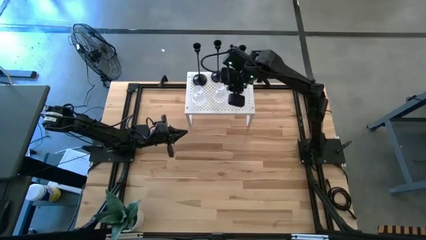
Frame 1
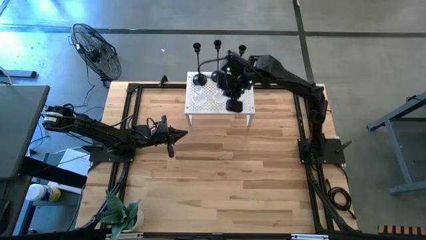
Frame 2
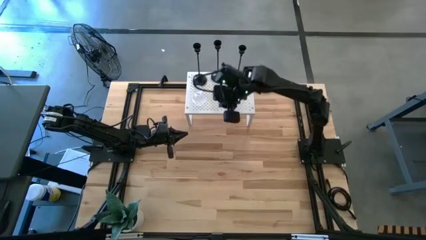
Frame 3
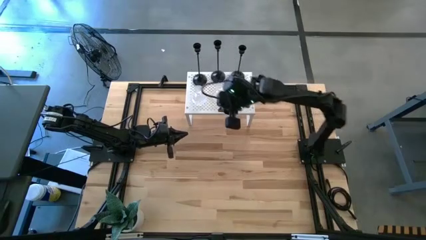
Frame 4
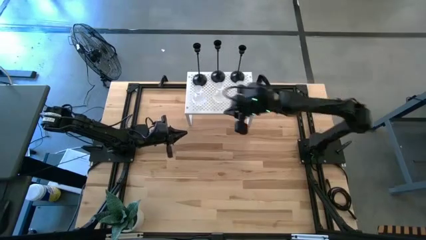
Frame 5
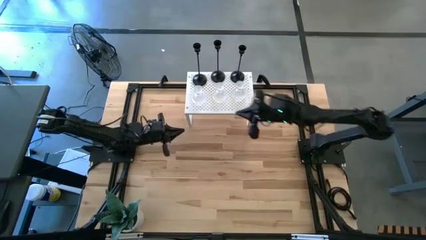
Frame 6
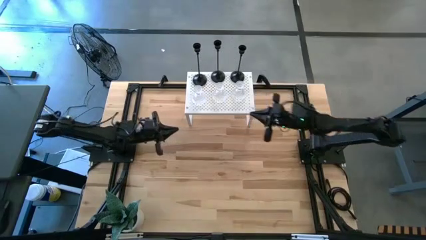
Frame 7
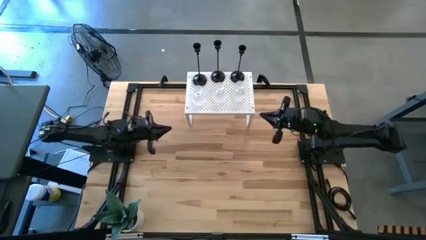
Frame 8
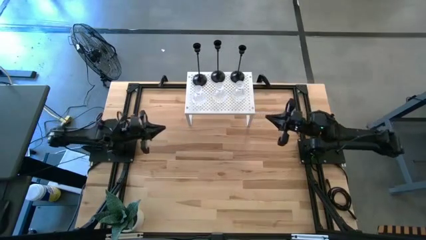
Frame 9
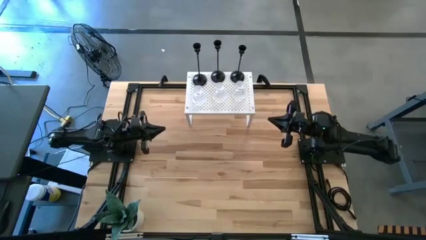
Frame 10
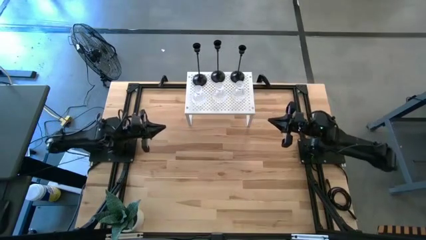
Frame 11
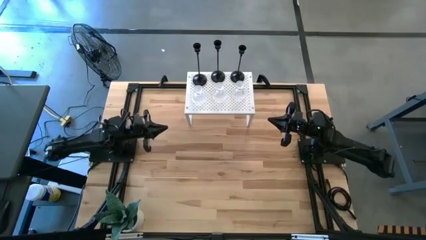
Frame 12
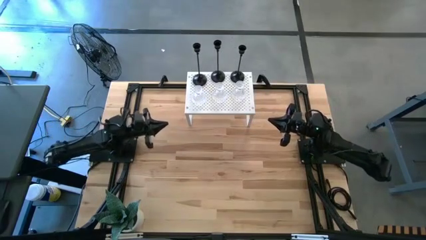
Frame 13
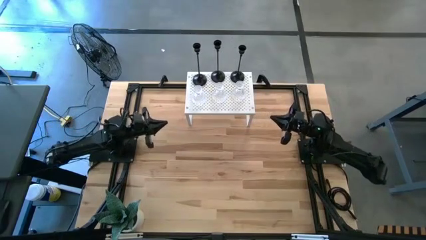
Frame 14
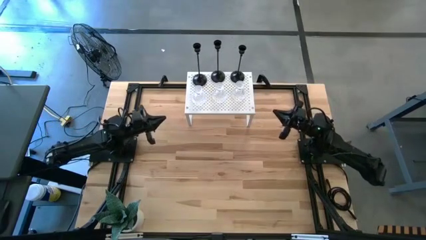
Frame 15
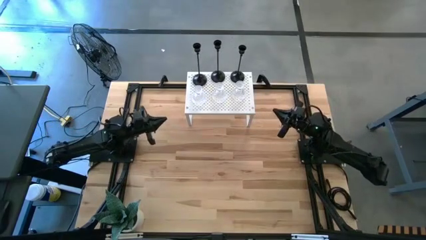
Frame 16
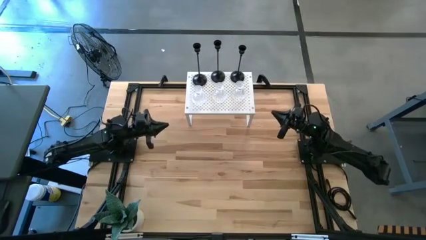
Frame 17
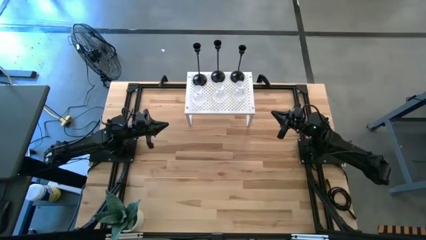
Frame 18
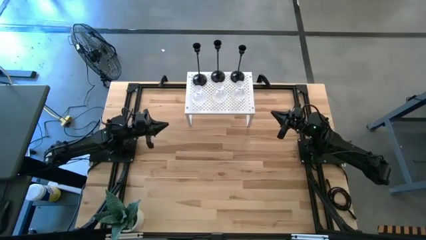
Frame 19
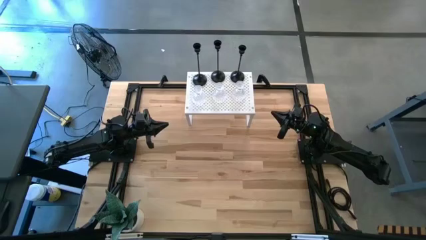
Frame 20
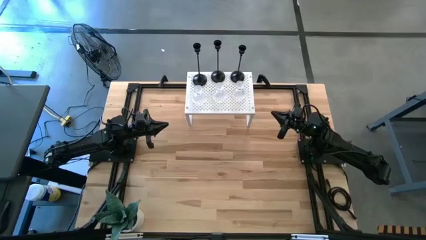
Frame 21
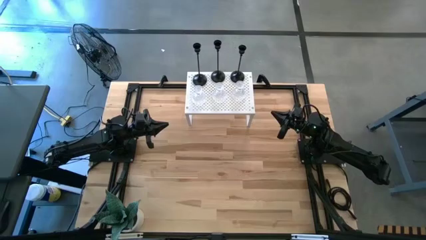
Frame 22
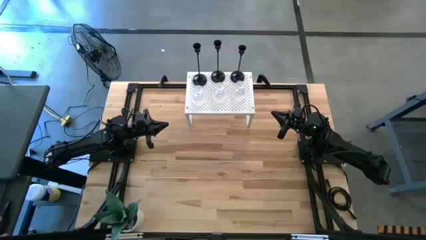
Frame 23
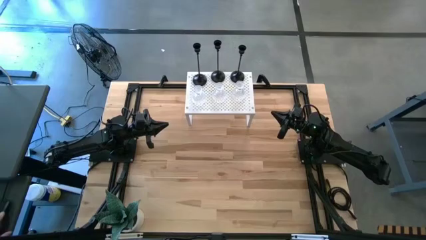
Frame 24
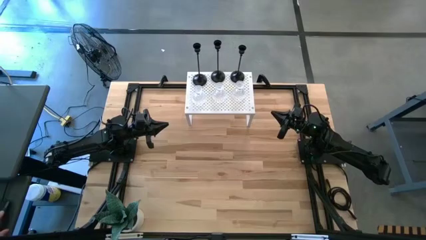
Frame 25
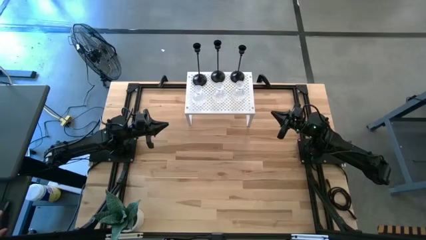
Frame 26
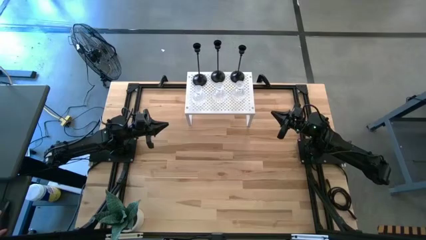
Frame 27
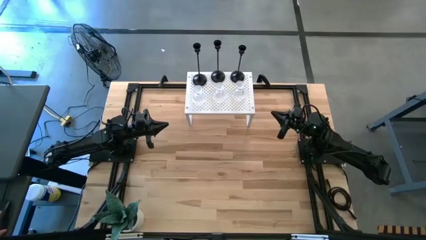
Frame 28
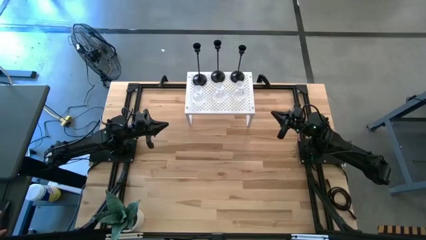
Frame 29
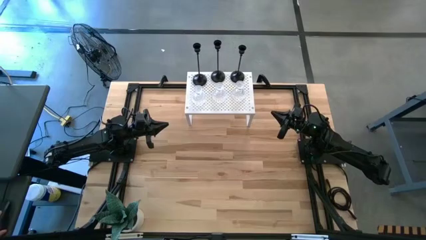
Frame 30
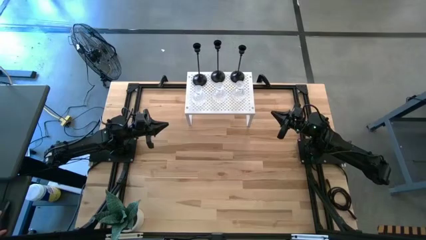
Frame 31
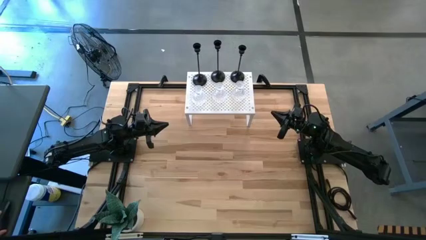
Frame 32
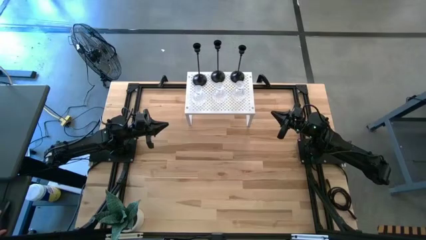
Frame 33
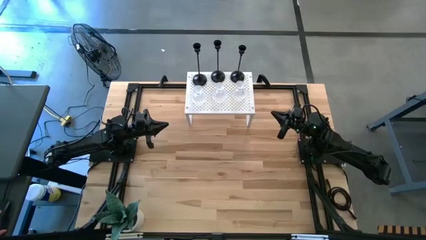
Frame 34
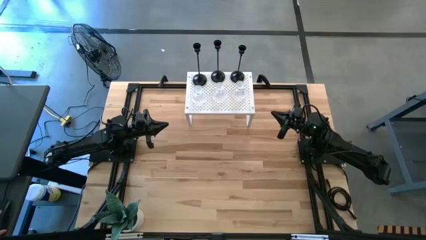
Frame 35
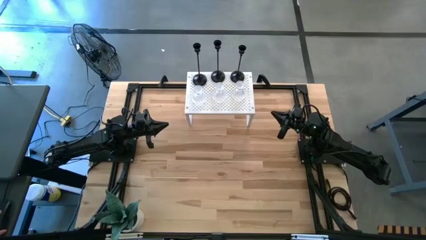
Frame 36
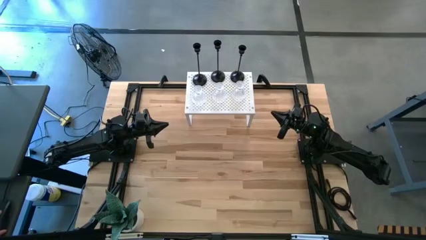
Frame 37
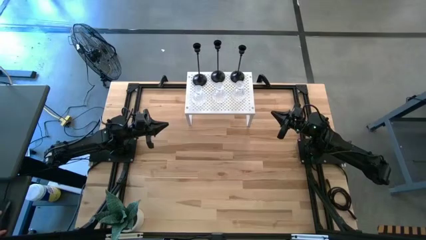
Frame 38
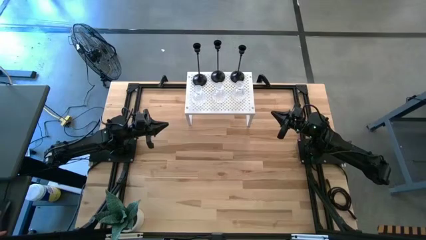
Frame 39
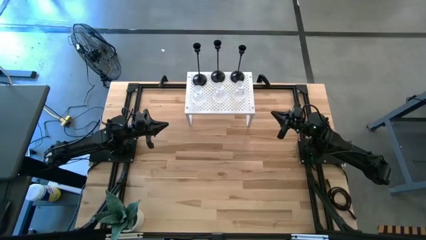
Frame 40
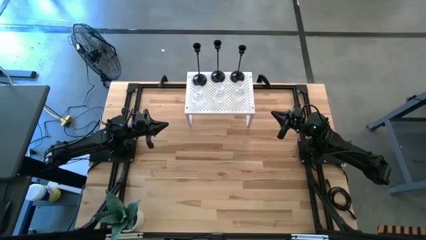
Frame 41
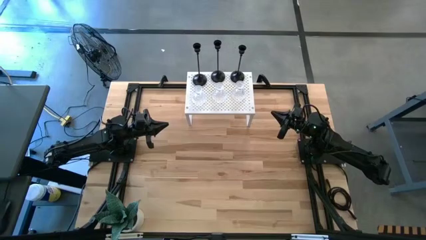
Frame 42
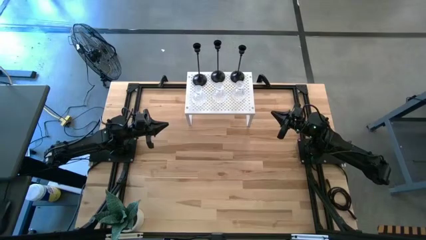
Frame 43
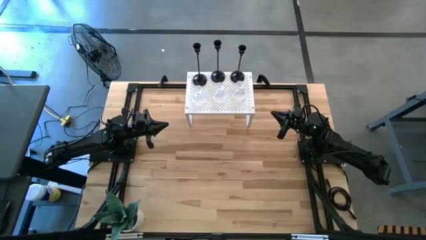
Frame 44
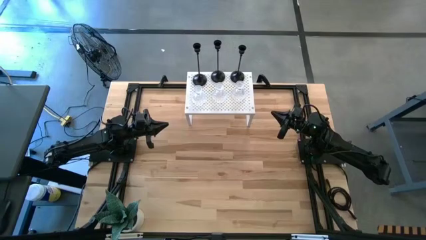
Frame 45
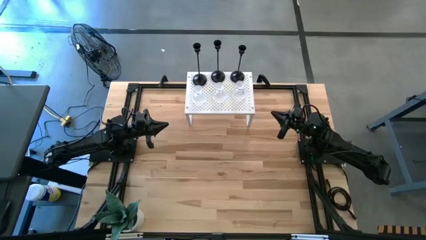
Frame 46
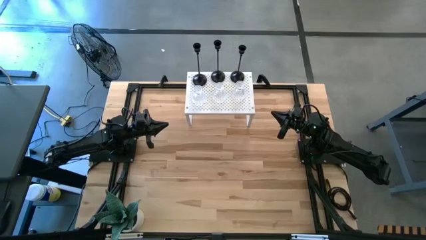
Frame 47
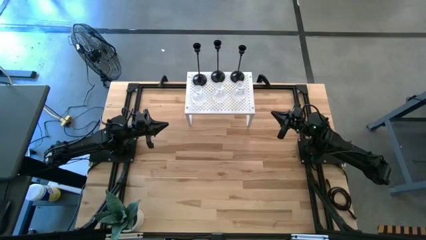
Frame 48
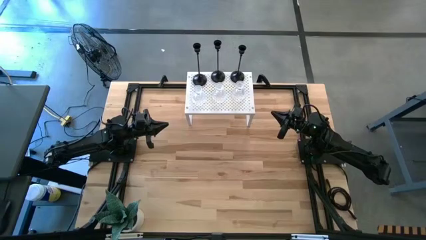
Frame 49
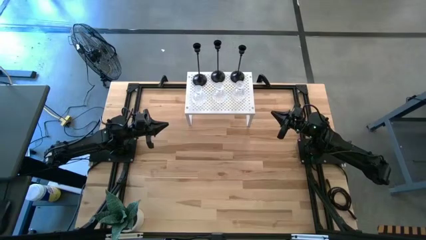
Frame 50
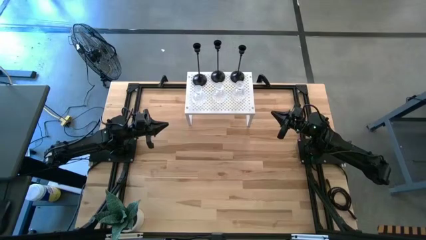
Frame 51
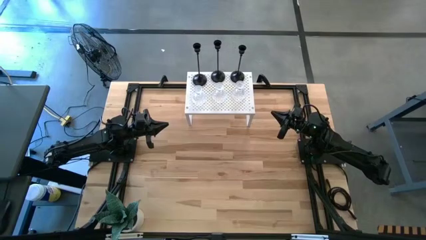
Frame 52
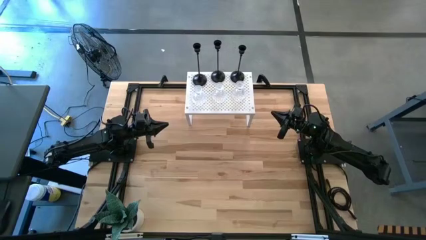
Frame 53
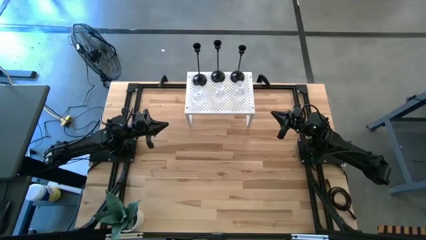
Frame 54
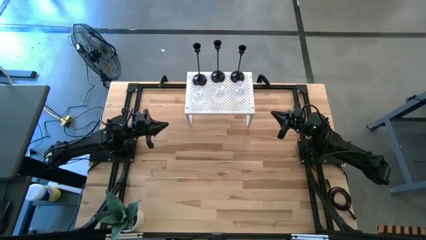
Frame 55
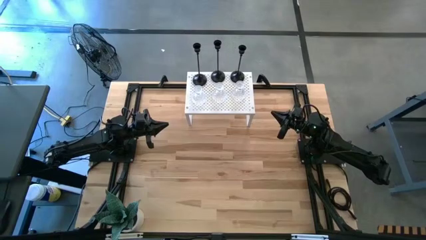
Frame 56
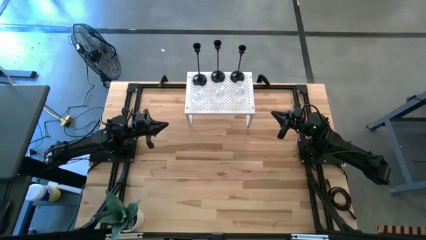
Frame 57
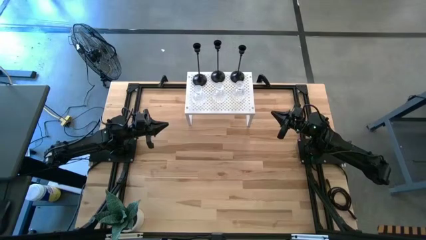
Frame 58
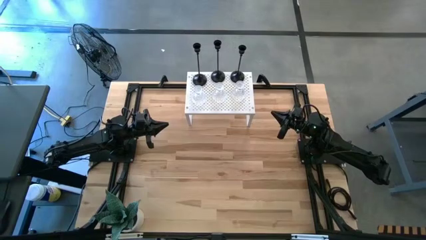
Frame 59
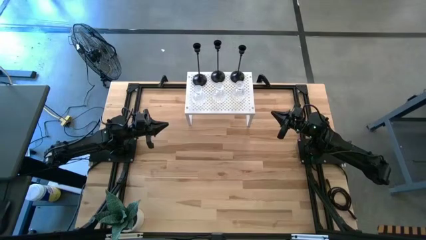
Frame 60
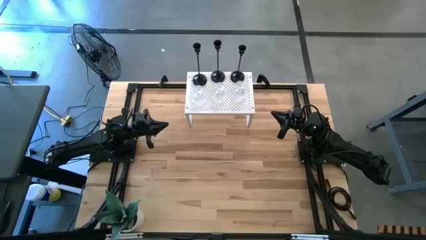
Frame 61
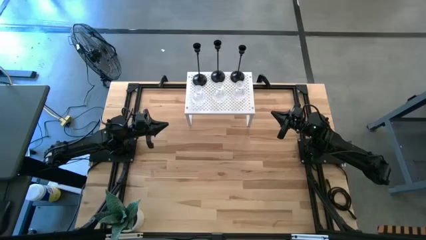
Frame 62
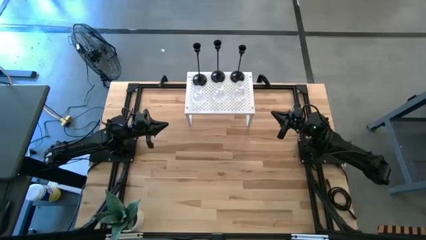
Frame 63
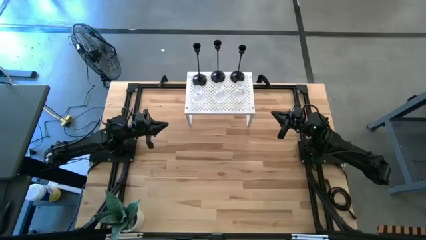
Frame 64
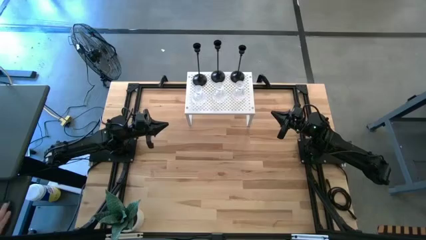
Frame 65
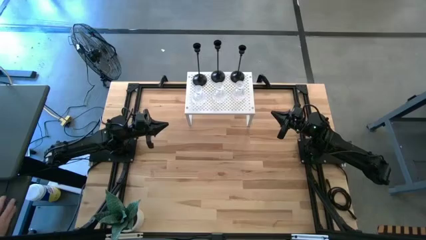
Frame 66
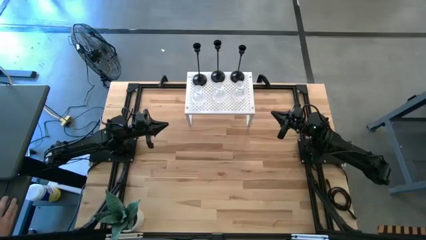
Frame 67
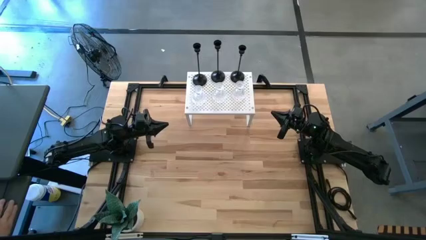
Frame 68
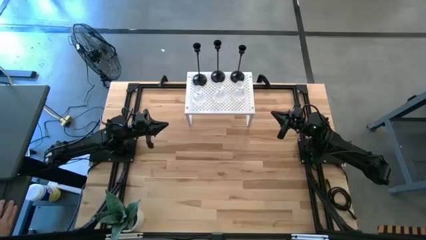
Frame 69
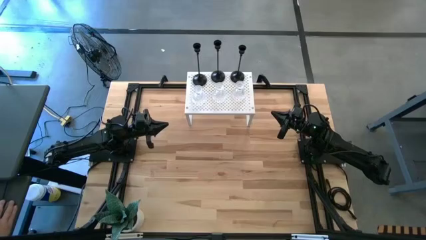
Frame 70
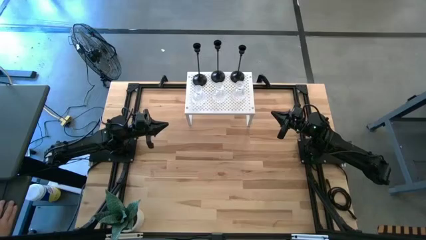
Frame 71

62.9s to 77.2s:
Task: Pick & Place candle stick holders
Return to Home Position
